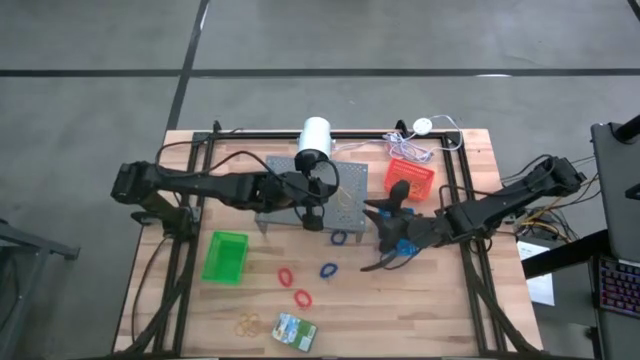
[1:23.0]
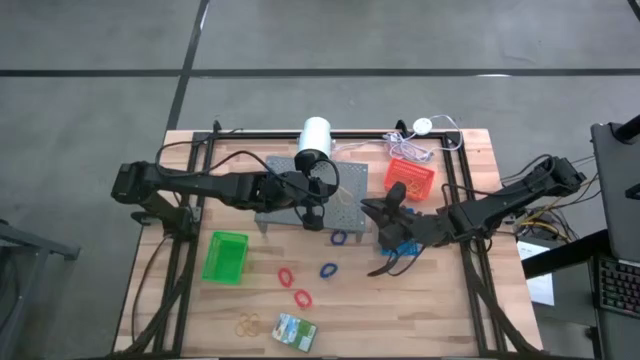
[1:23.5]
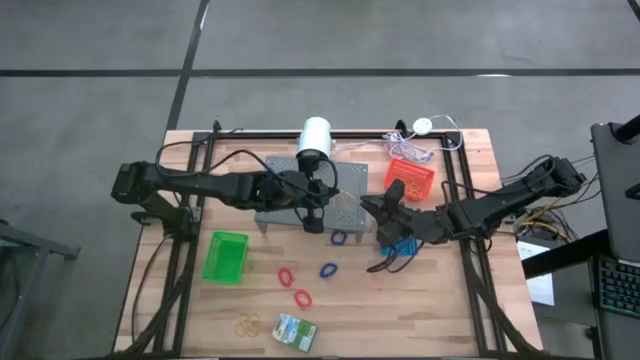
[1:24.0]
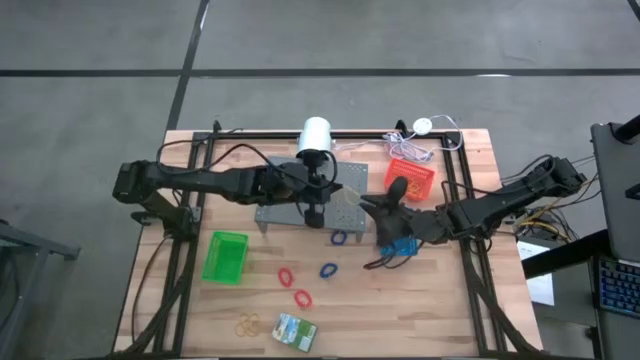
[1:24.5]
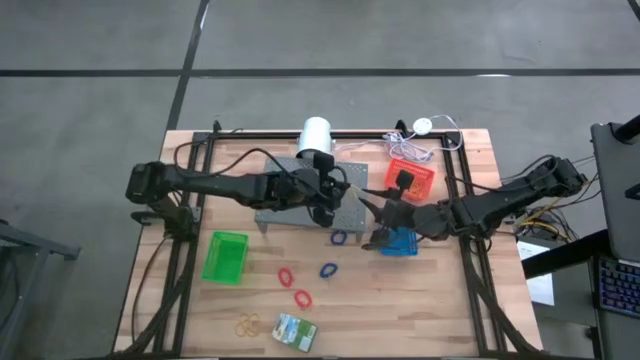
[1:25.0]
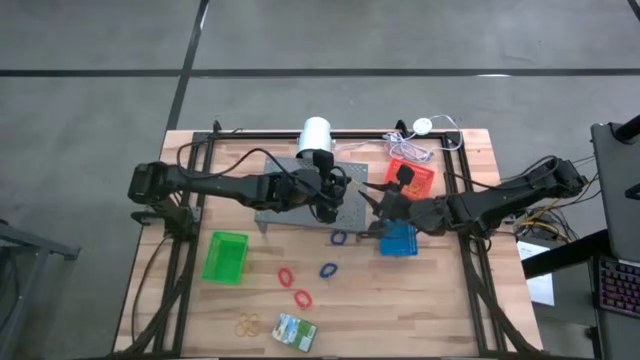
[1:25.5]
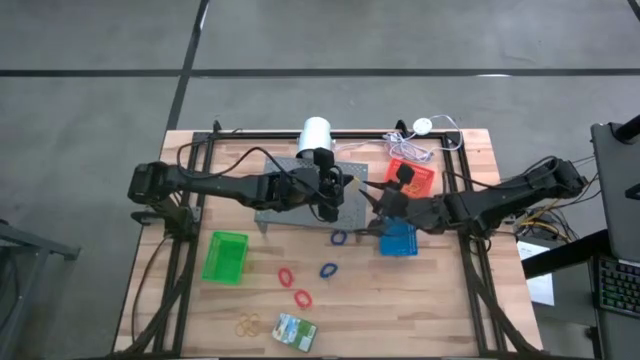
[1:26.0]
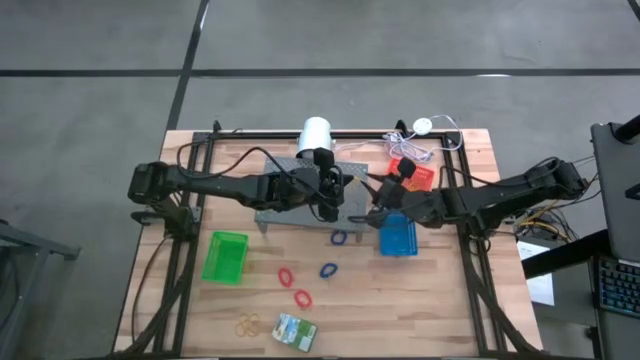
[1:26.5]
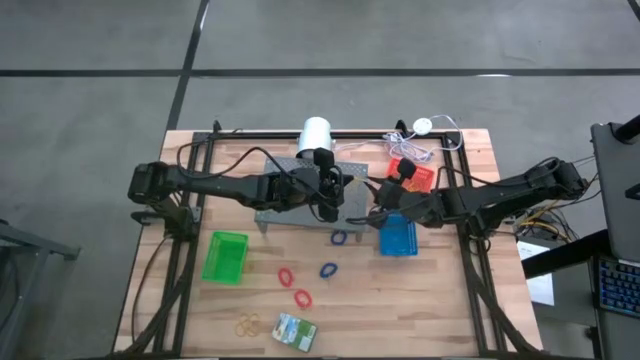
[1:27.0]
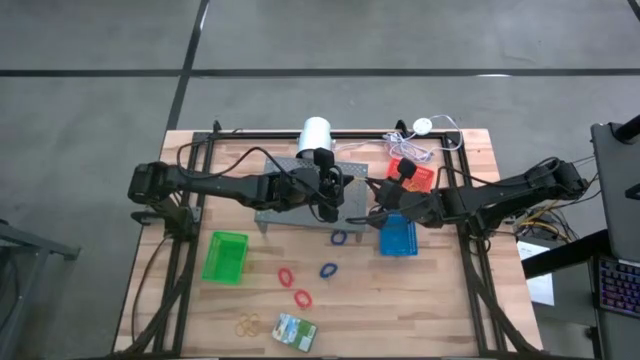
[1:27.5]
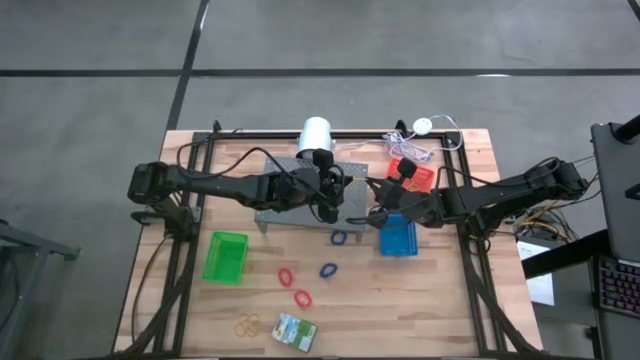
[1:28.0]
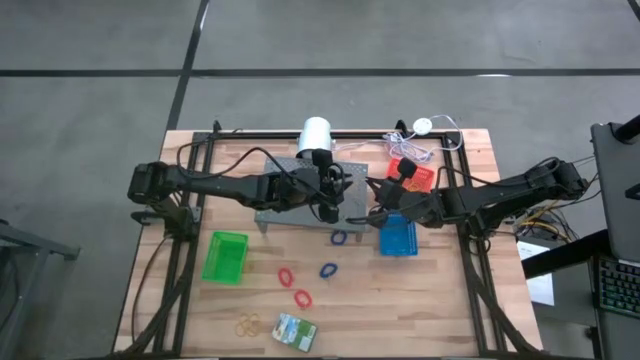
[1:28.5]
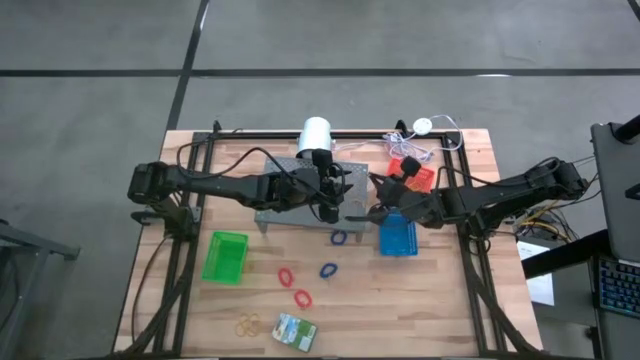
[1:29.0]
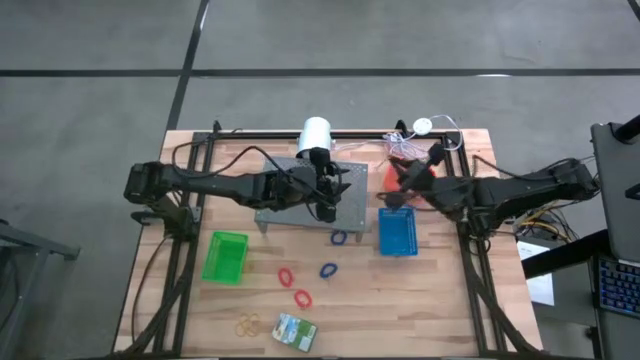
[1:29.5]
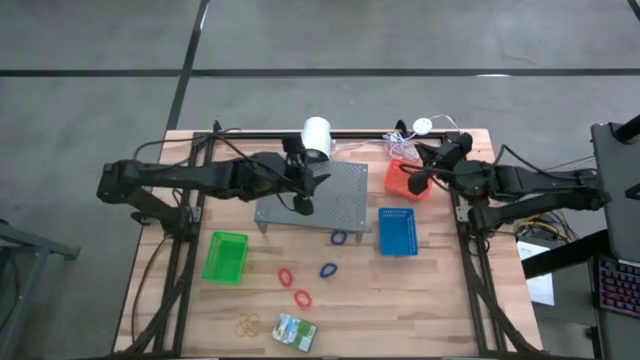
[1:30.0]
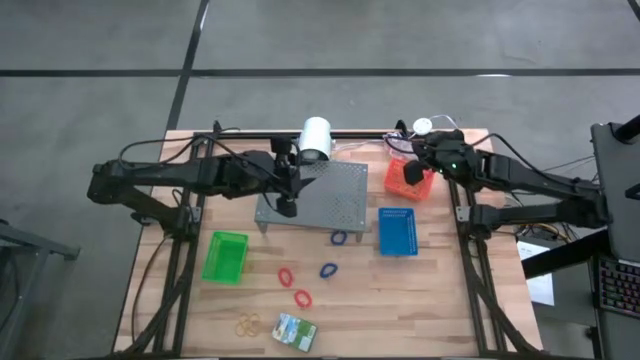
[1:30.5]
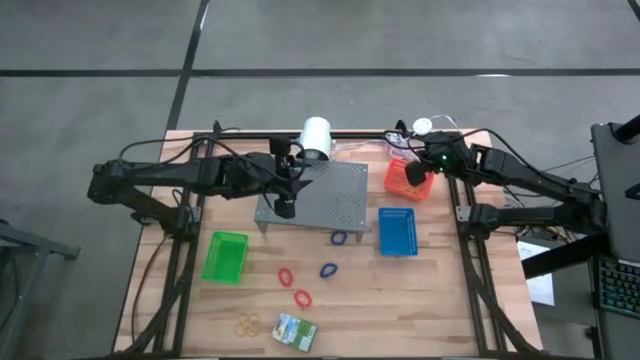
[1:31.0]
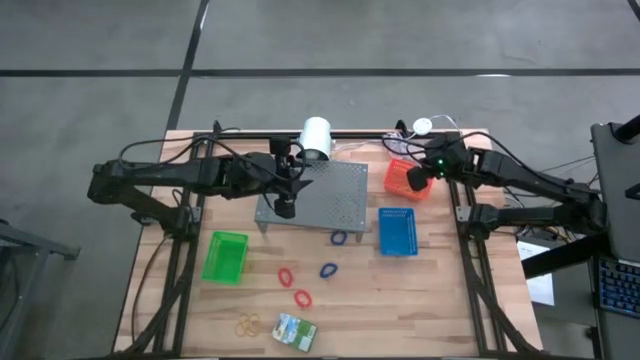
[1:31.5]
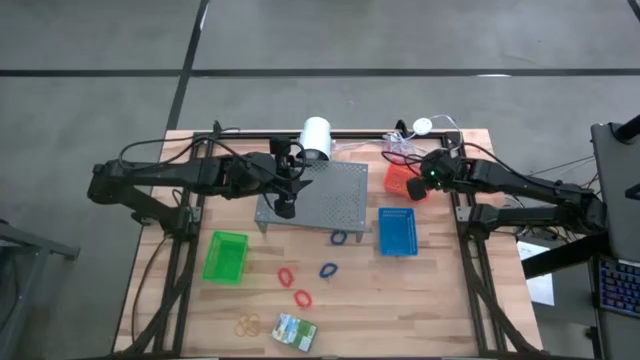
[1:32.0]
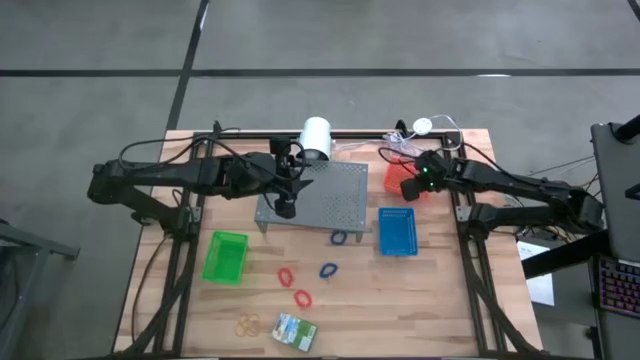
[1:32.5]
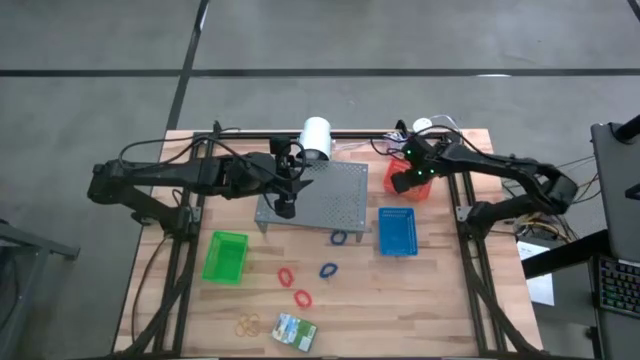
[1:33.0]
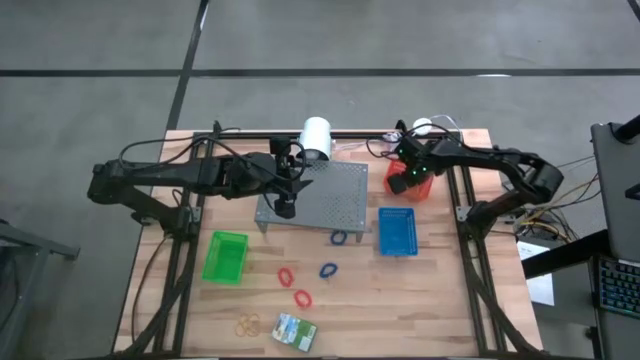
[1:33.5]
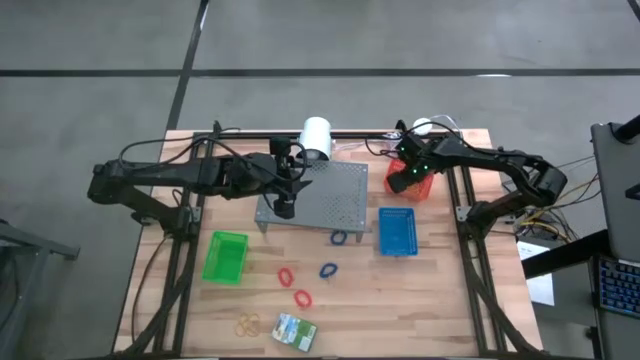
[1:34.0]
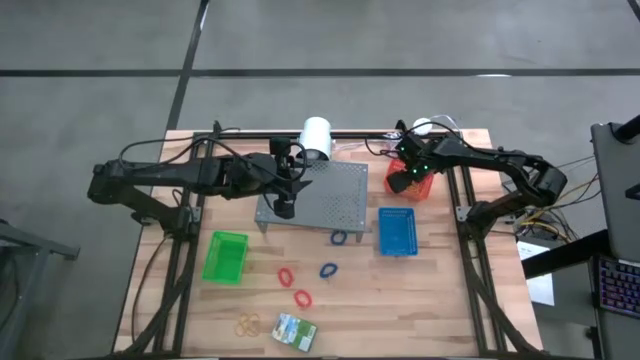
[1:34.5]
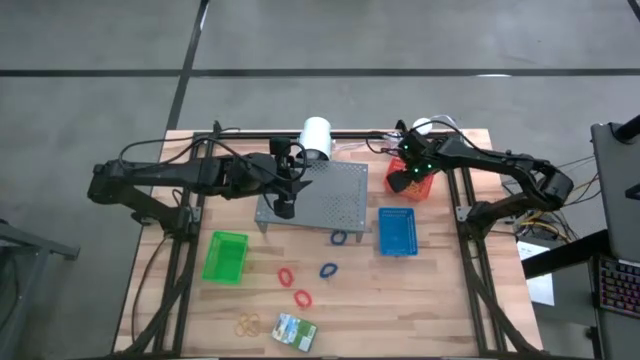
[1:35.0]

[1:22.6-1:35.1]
Task: Pick & Place Office Desk Supplies
Put the yellow rubber band into the orange bin

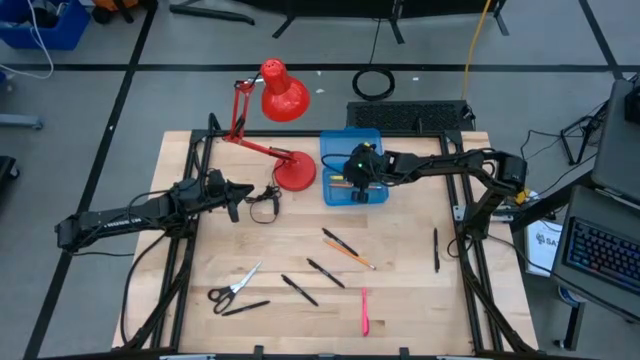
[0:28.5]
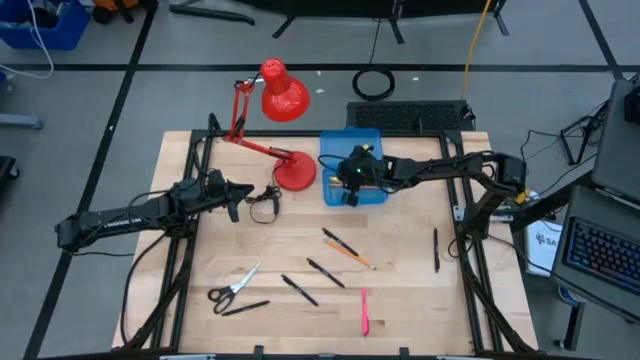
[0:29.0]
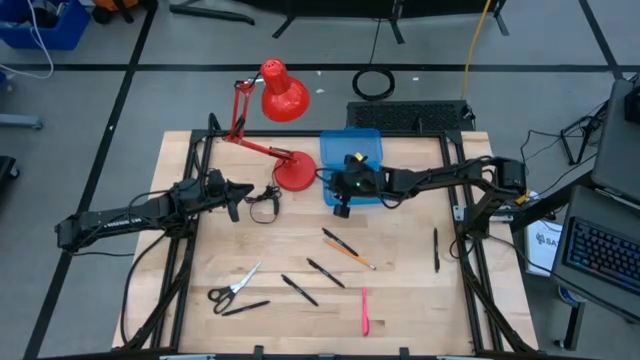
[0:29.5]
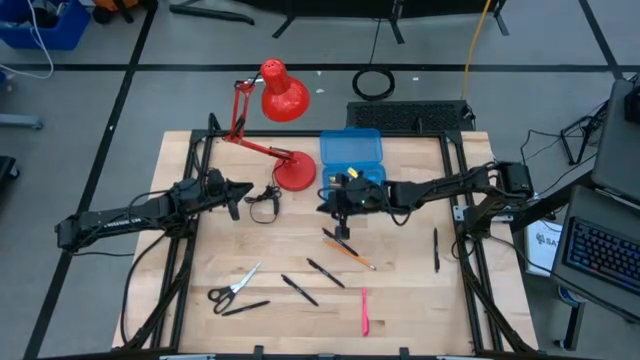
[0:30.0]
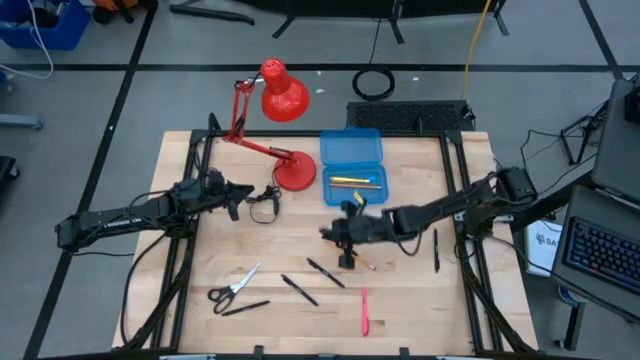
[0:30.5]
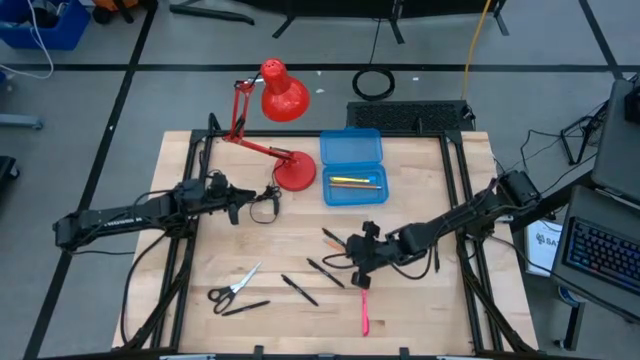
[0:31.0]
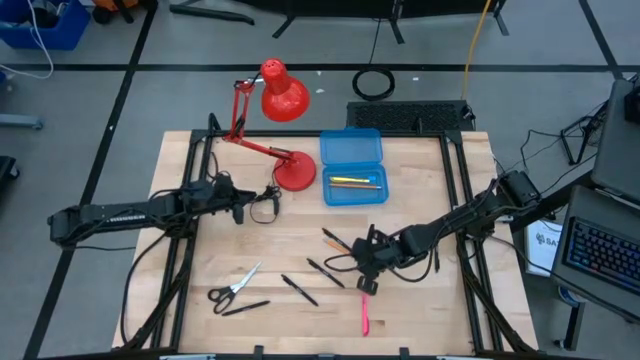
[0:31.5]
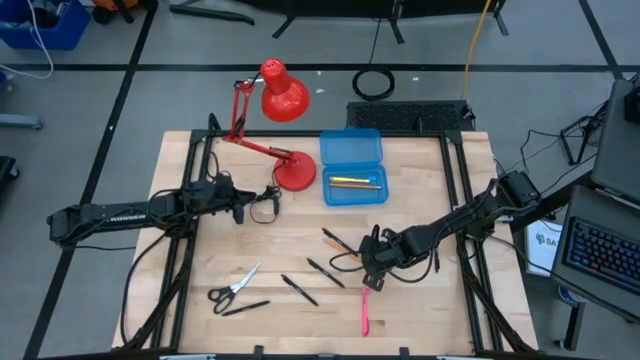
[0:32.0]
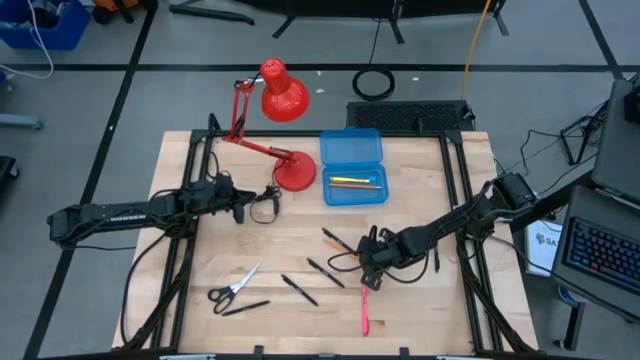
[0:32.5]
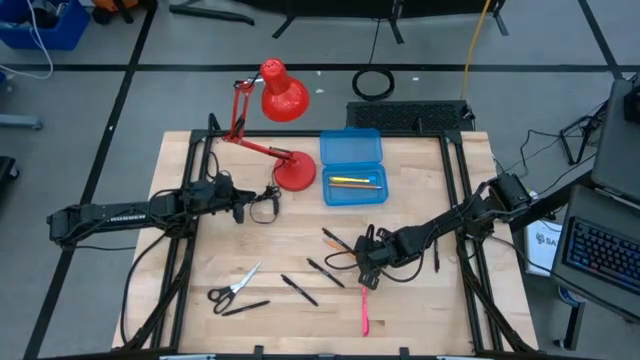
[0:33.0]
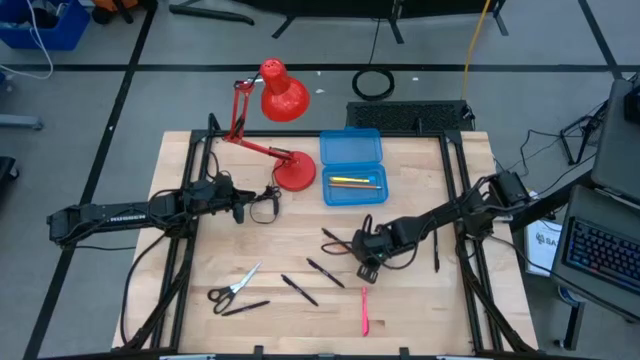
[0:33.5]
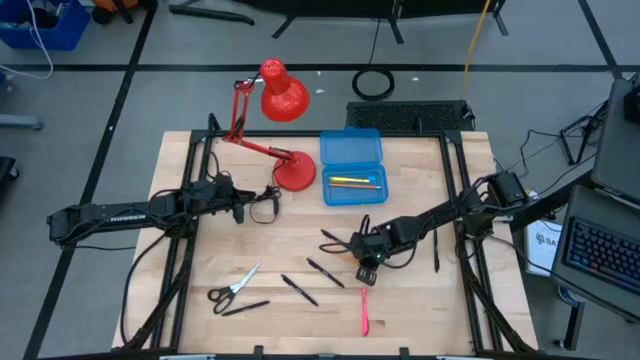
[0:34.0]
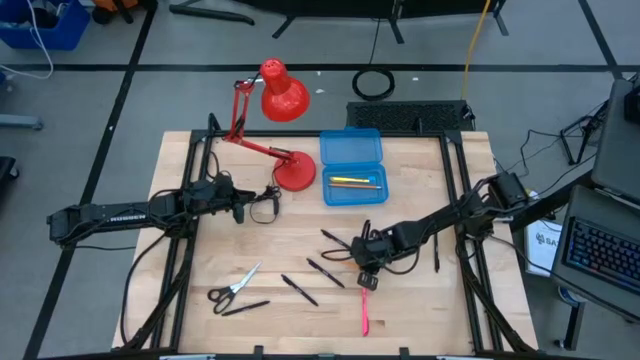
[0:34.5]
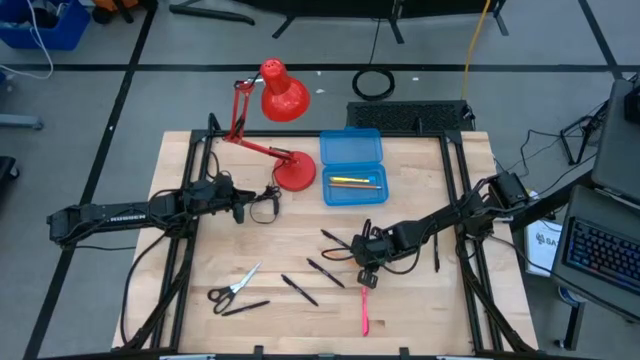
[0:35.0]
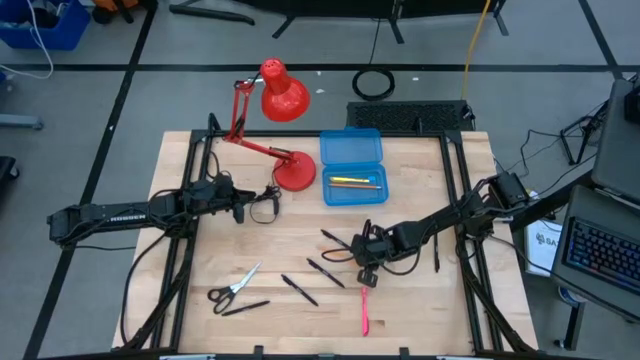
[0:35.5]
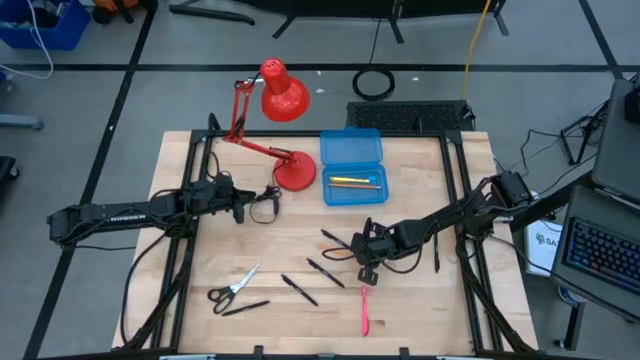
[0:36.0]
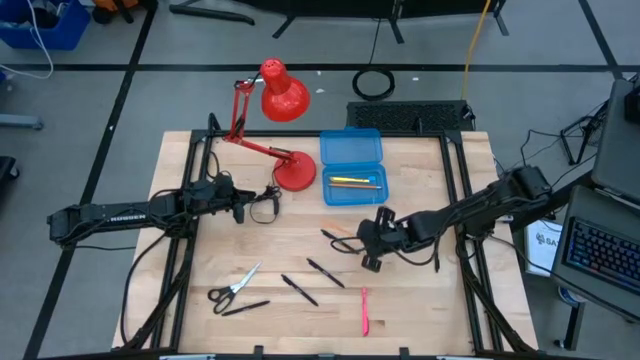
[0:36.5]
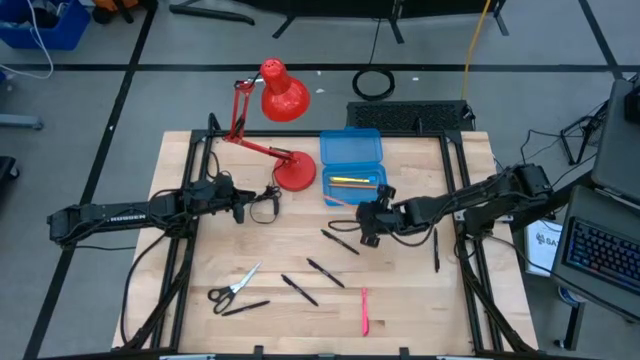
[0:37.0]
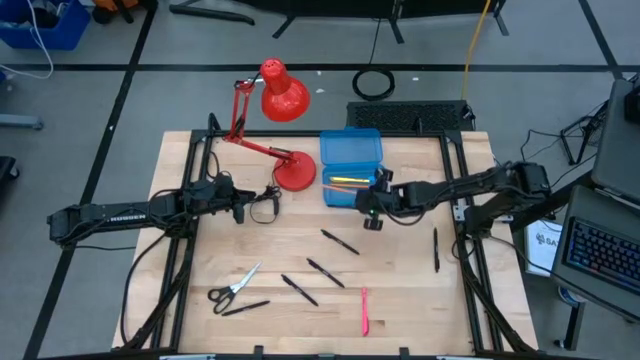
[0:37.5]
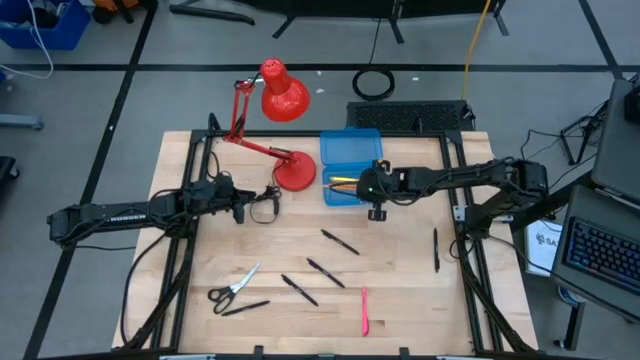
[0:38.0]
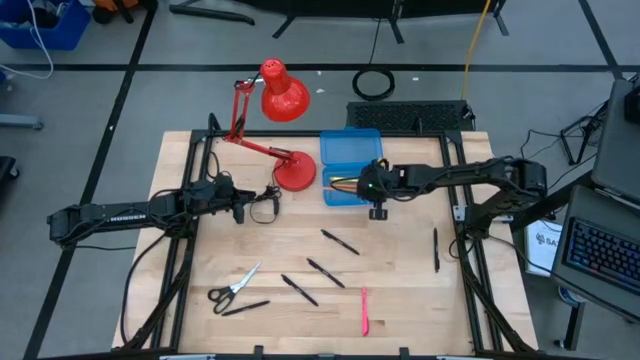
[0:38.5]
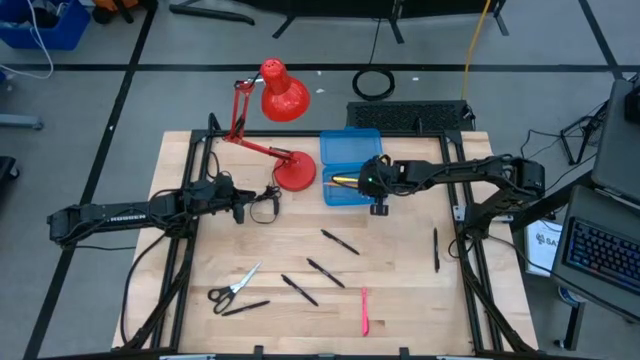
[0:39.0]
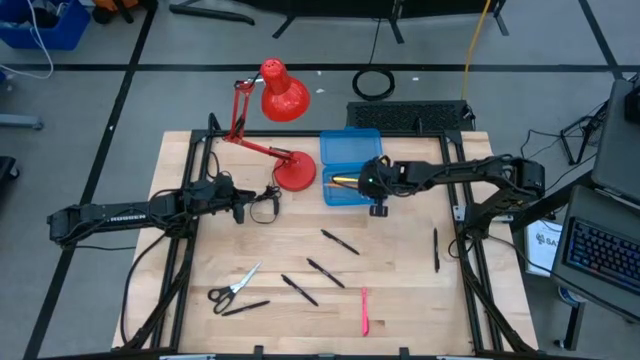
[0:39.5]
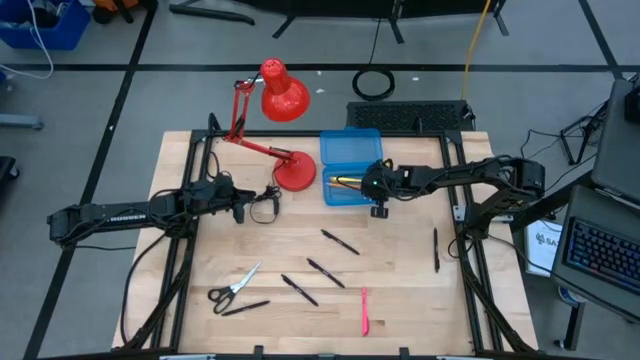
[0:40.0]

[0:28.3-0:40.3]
Task: Pick & place school supplies into a supply box
Put the orange pencil into the blue supply box
